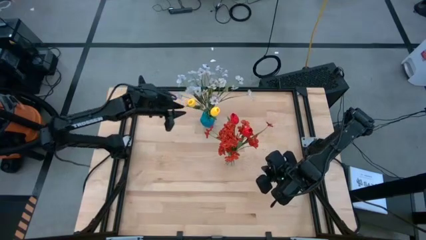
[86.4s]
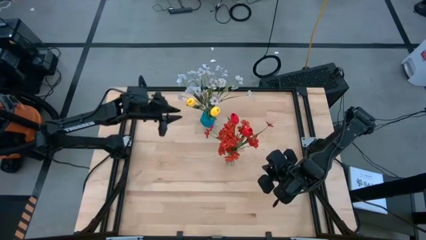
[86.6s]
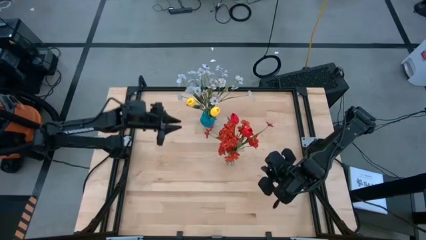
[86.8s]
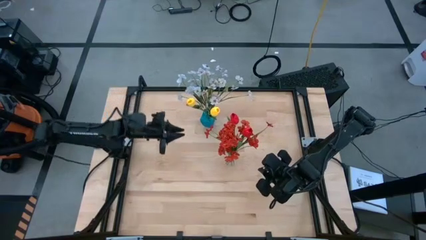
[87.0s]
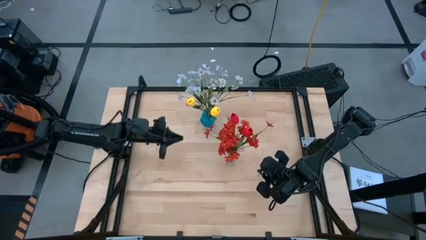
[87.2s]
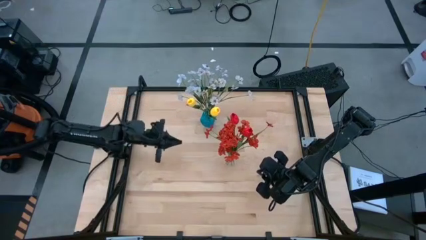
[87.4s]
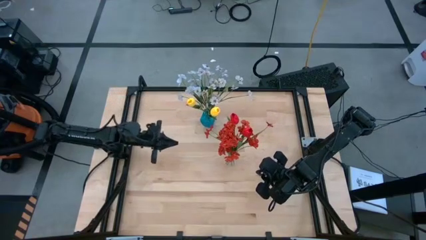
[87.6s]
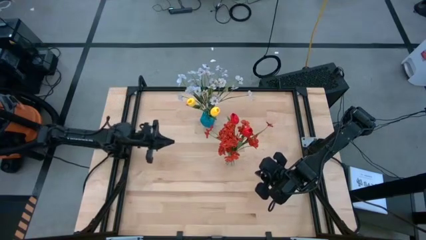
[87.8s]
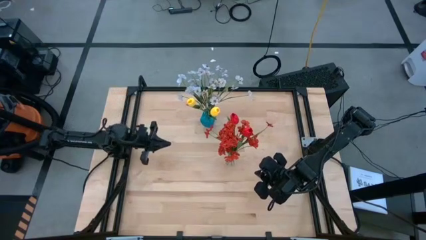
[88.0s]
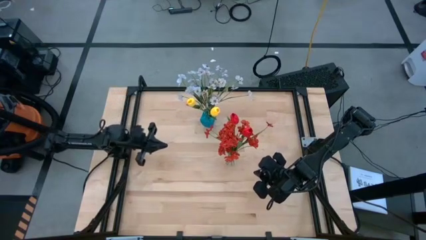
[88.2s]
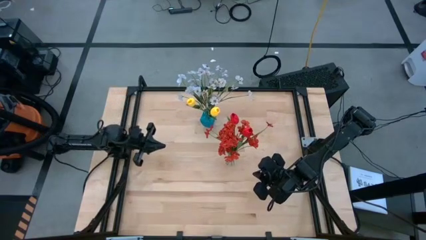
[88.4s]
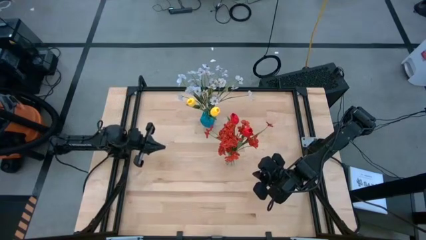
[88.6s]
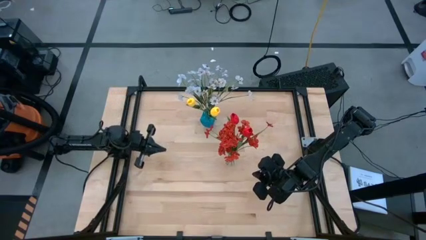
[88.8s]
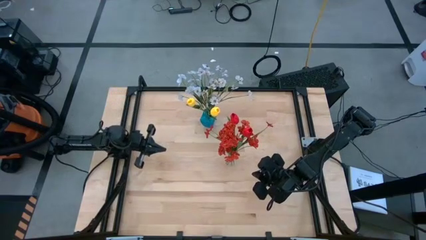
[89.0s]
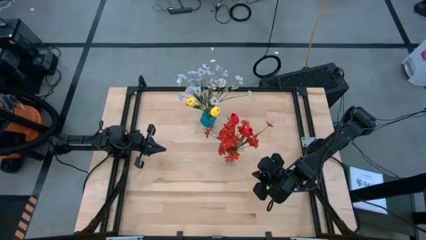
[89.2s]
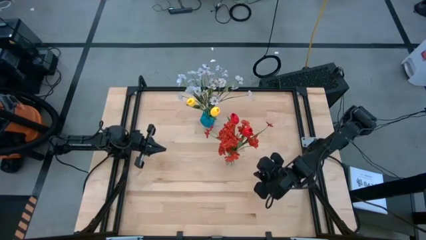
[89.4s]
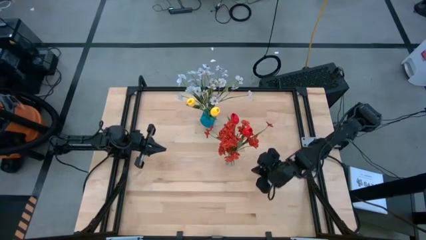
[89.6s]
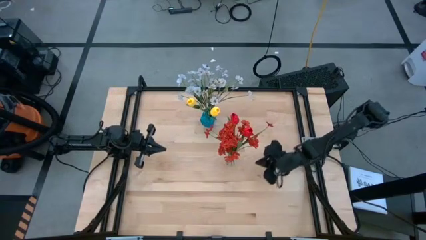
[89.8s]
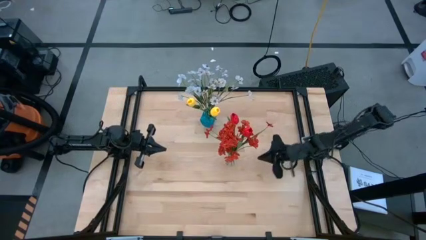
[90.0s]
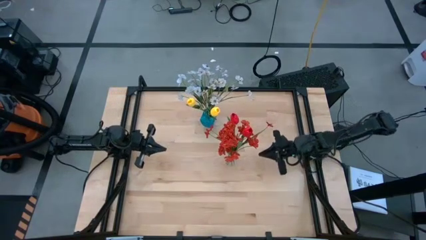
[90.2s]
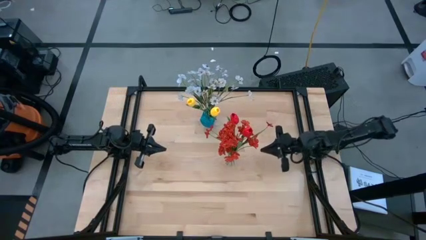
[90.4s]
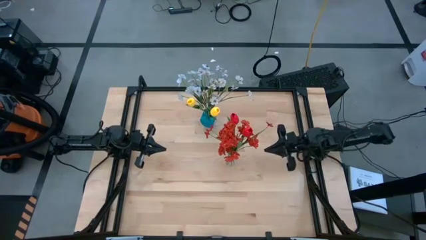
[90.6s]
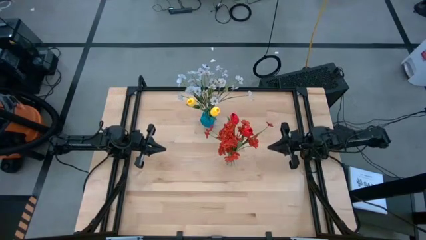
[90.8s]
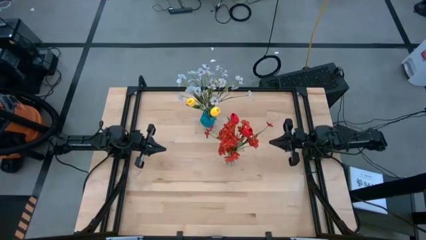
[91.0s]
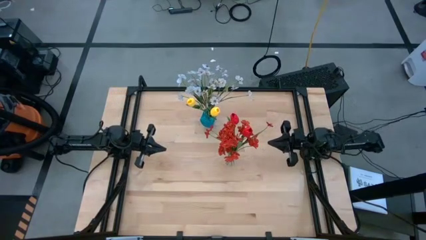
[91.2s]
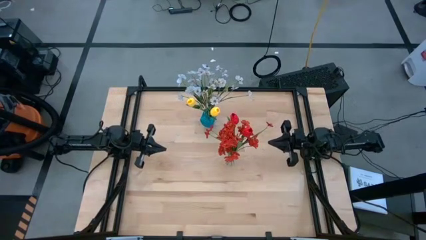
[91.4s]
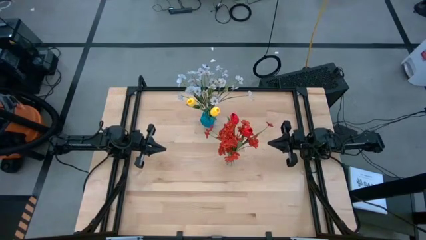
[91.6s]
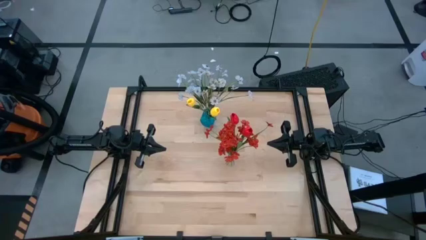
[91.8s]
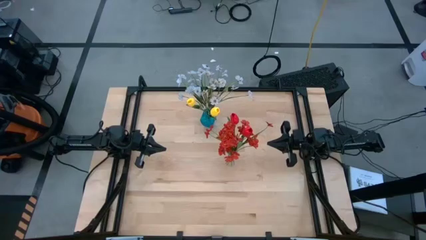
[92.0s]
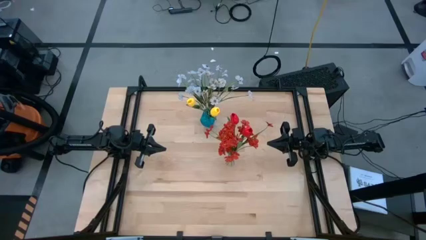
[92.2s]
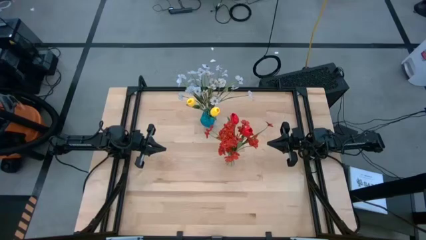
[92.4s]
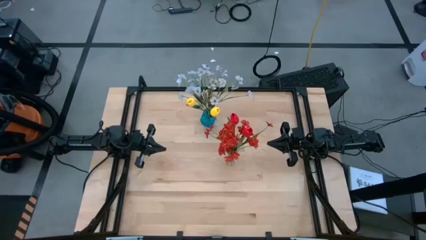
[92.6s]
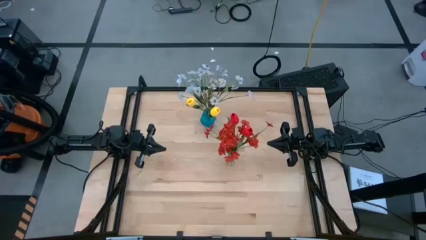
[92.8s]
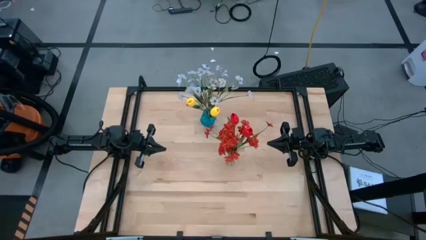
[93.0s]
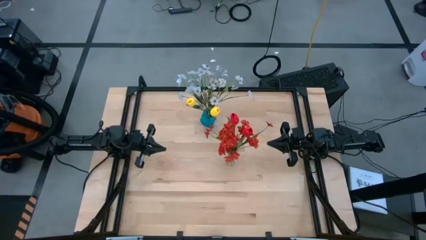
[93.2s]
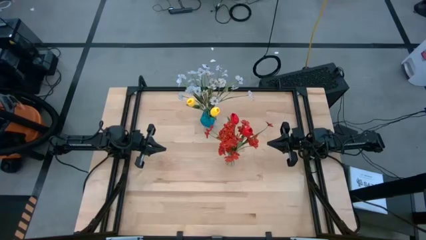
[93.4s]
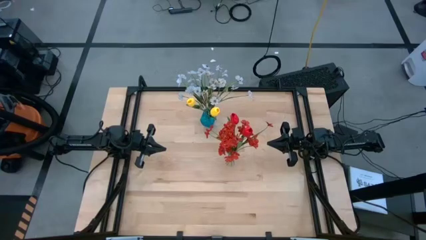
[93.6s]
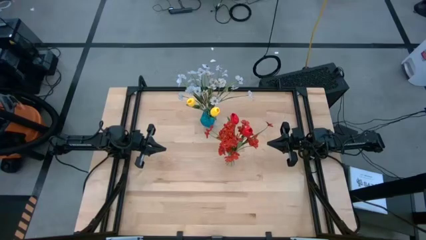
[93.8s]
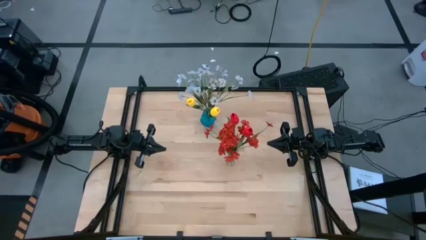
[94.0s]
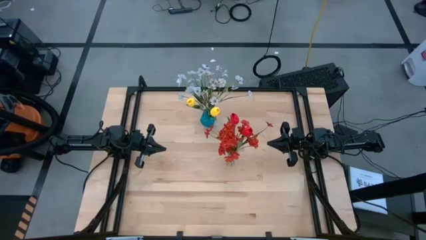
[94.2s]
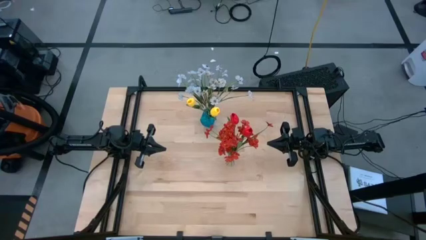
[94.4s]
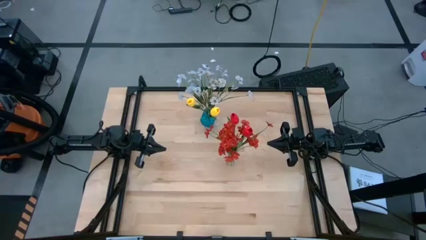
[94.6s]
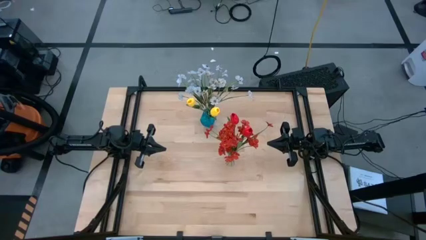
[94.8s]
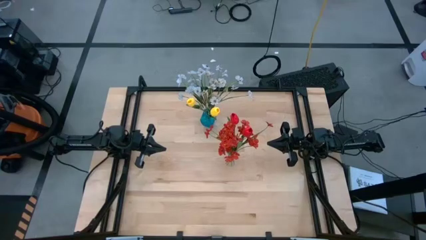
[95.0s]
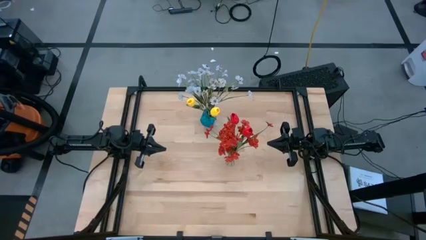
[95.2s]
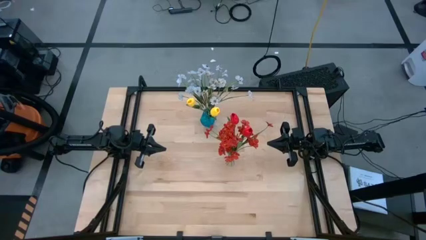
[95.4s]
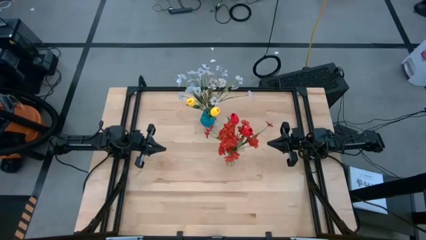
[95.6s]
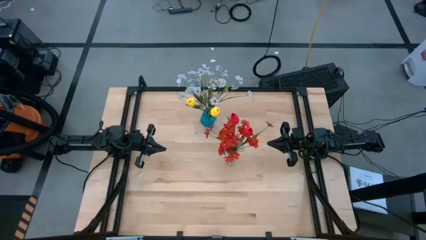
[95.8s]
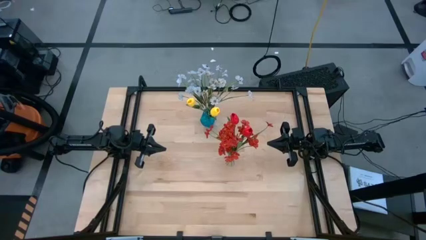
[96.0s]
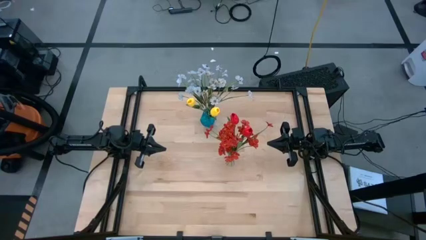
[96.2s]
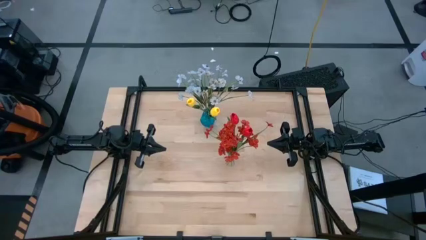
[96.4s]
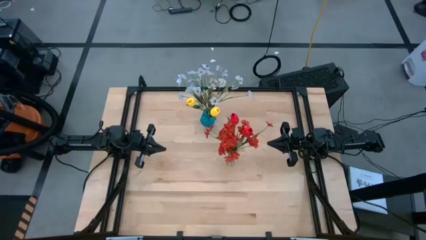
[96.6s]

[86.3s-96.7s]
Task: Sort flowers into vase by color
Return to Home Position

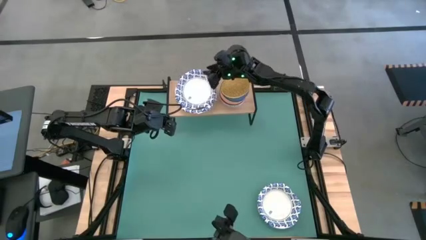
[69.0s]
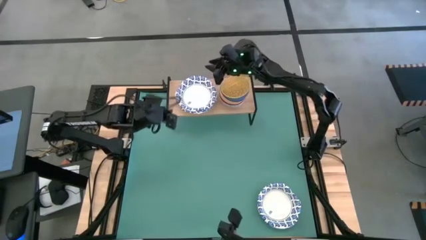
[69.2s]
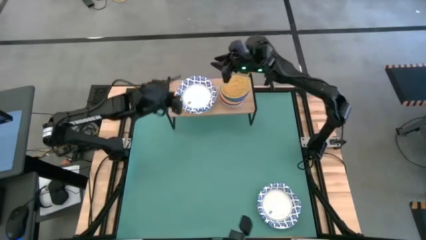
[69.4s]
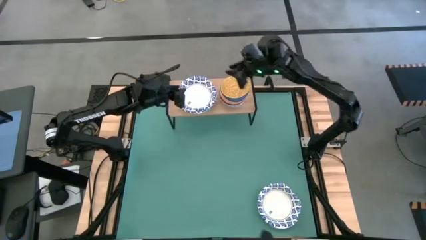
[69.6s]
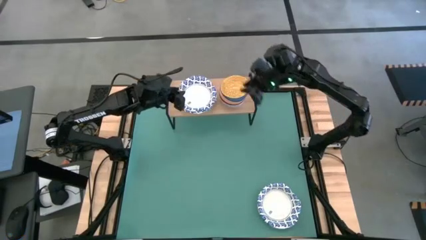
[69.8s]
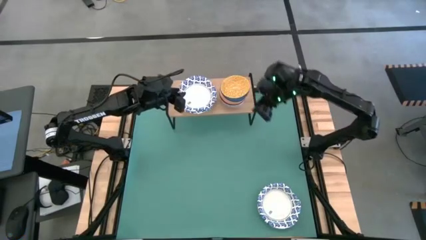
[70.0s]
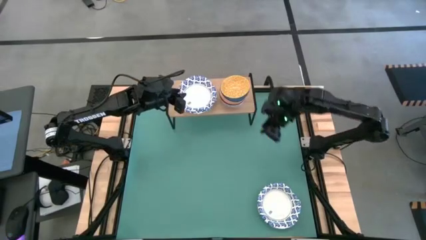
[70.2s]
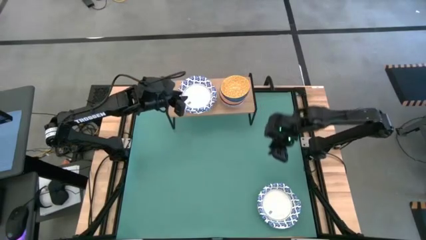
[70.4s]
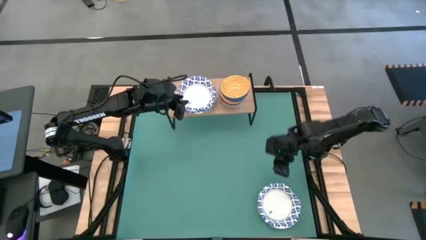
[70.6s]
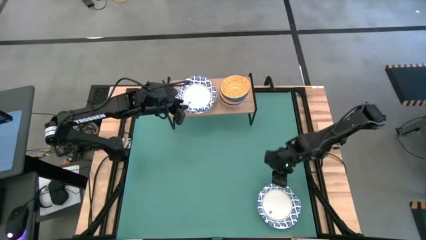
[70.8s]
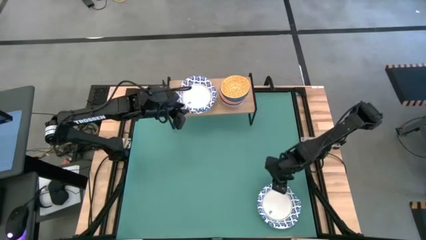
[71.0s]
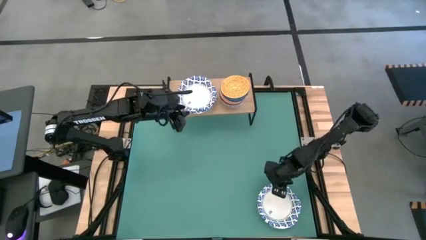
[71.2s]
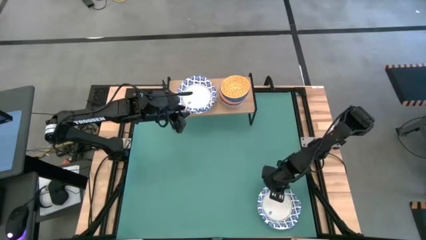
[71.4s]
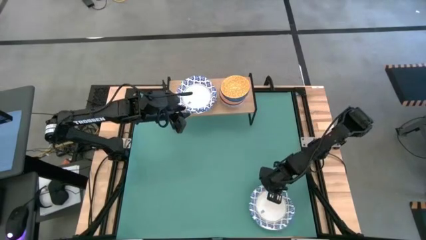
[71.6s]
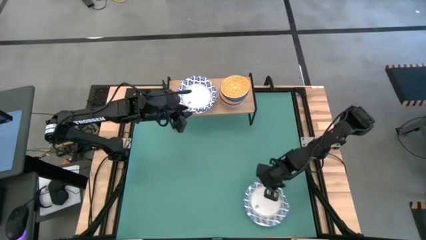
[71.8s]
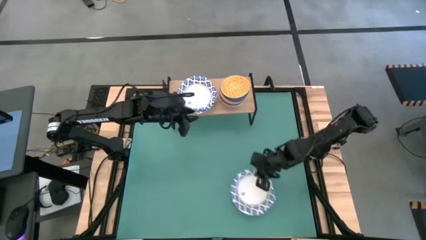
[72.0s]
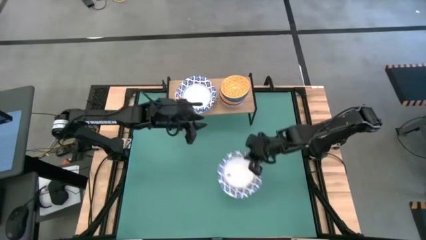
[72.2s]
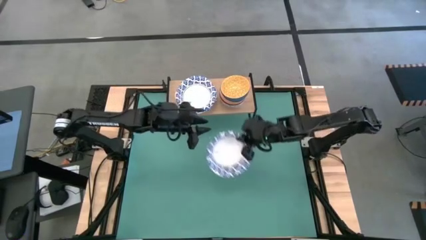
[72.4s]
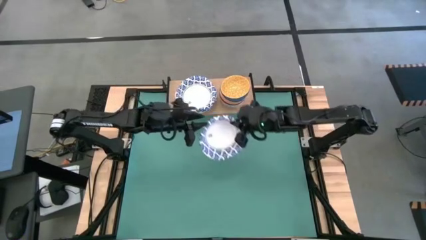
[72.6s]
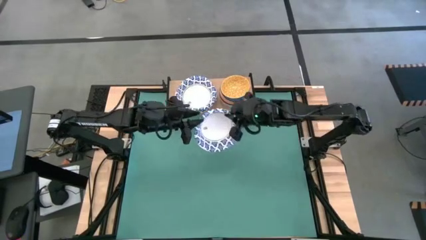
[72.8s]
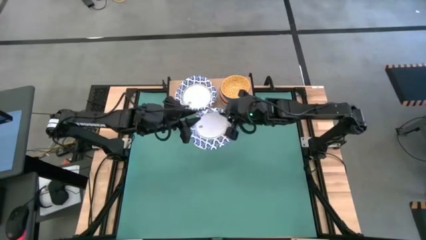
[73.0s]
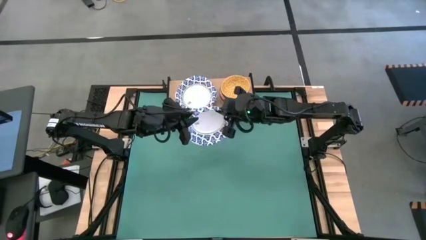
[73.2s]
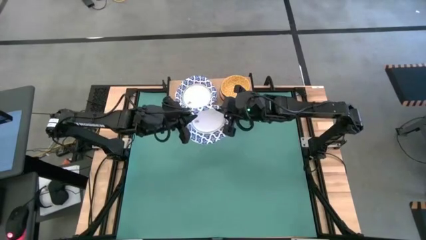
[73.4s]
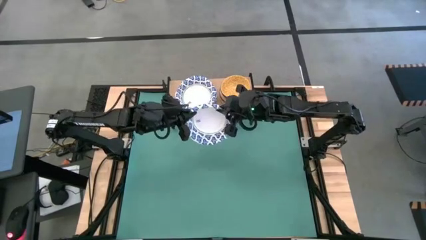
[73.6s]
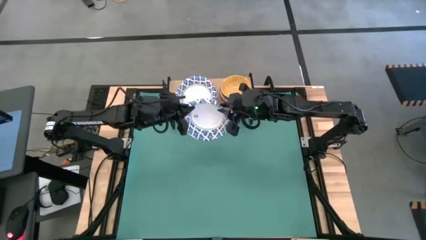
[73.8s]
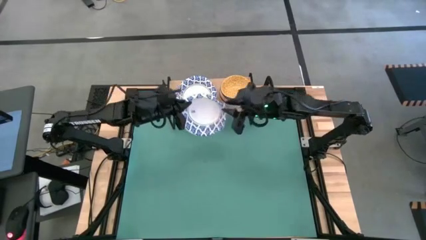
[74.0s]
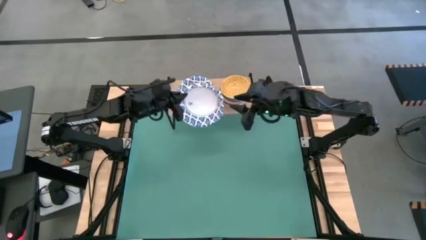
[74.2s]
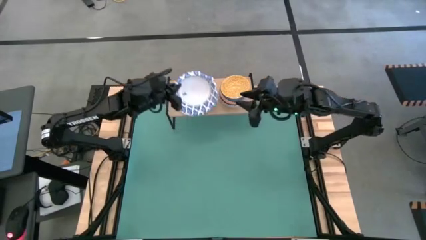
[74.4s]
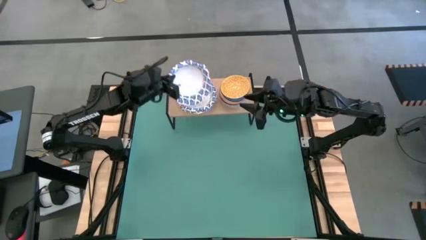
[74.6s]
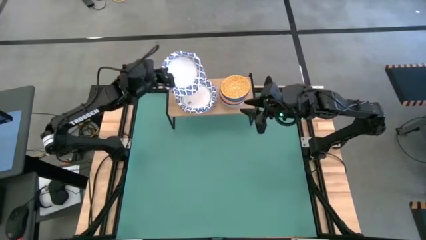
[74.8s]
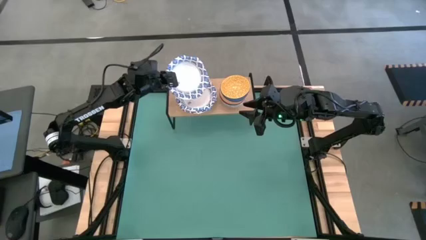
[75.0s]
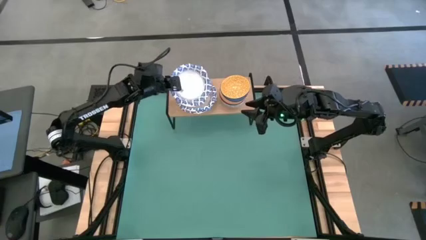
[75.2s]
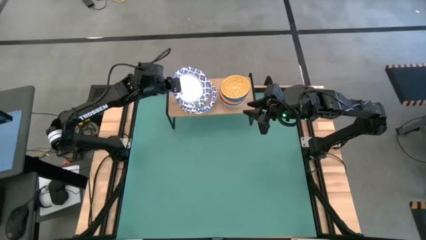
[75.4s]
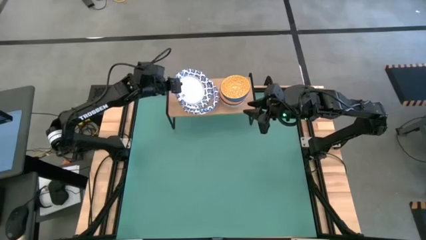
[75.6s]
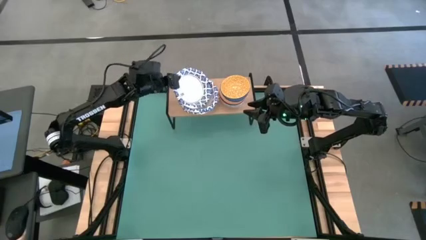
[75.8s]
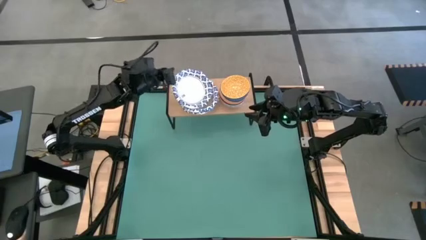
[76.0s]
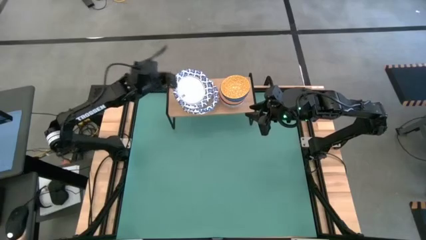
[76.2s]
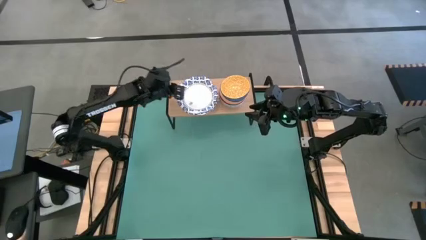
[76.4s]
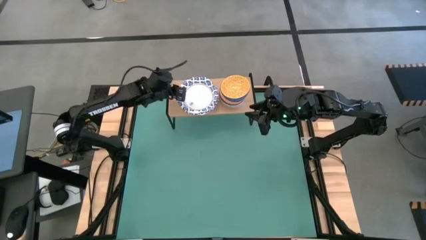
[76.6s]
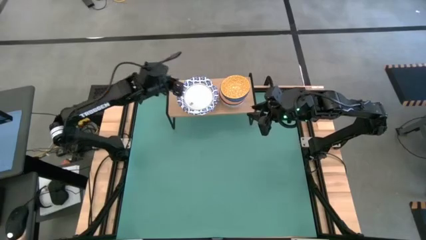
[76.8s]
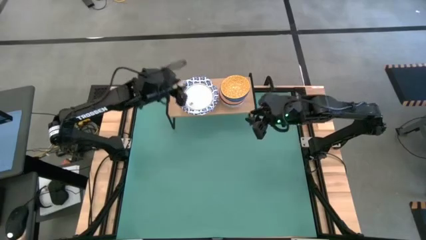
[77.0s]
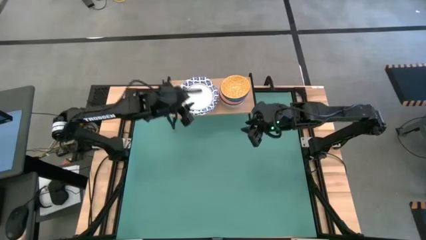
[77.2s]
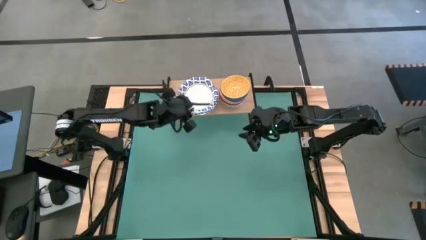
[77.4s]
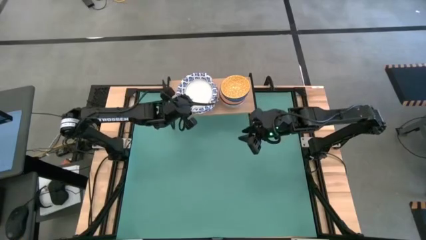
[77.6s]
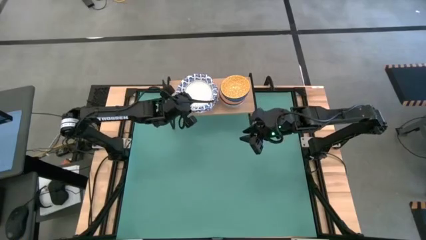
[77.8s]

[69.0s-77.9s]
Task: Place and stack bowls onto a shelf
Stack the white bowl on top of the white bowl on the shelf
